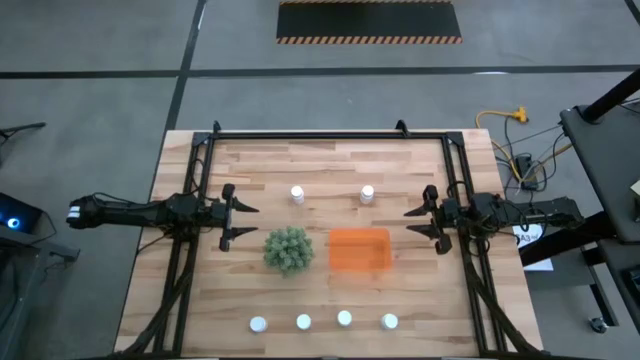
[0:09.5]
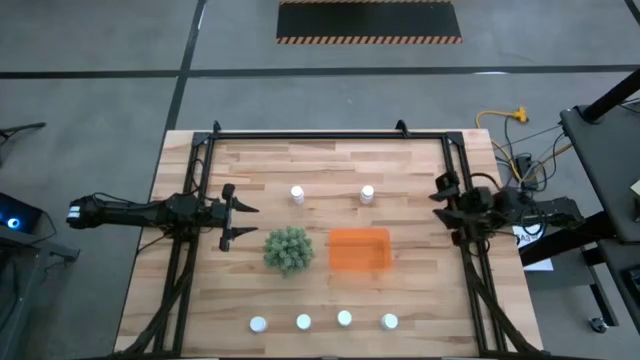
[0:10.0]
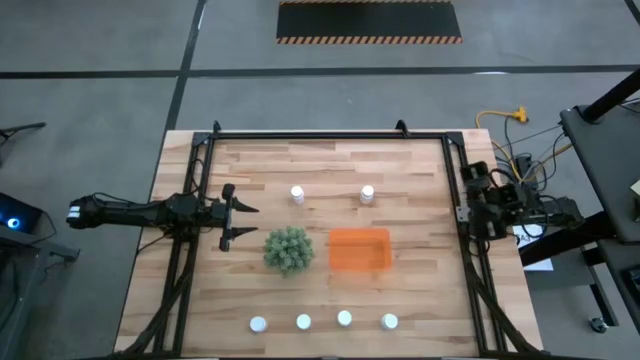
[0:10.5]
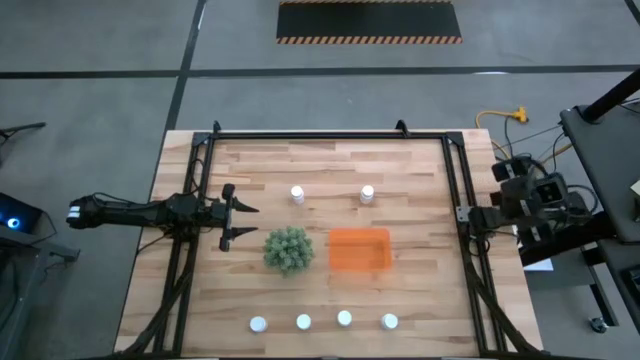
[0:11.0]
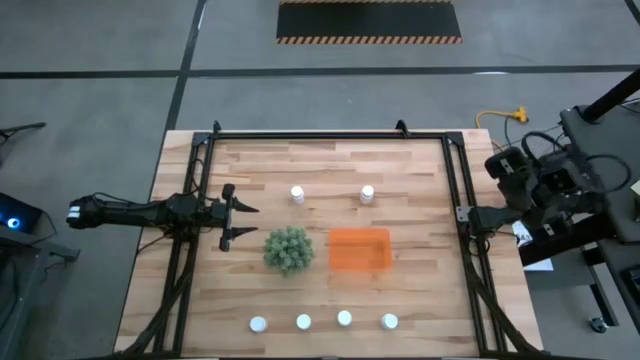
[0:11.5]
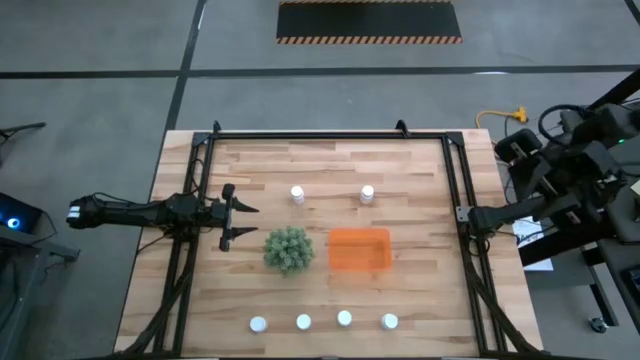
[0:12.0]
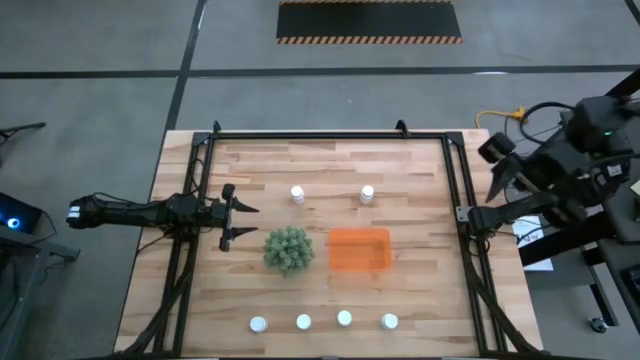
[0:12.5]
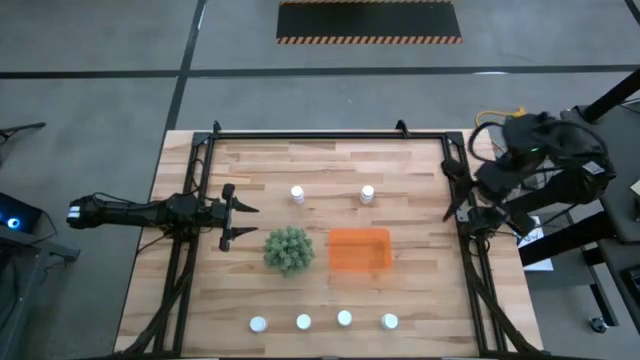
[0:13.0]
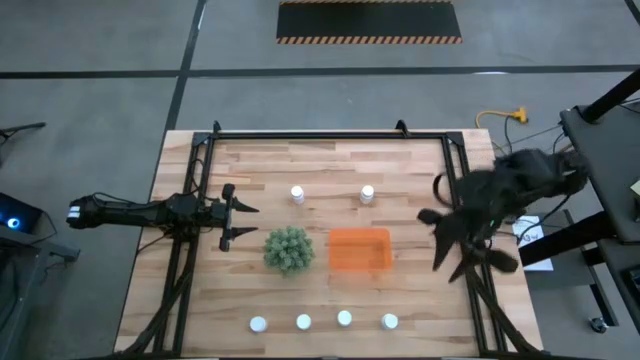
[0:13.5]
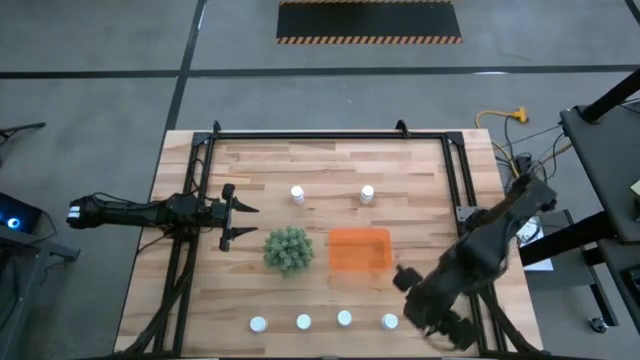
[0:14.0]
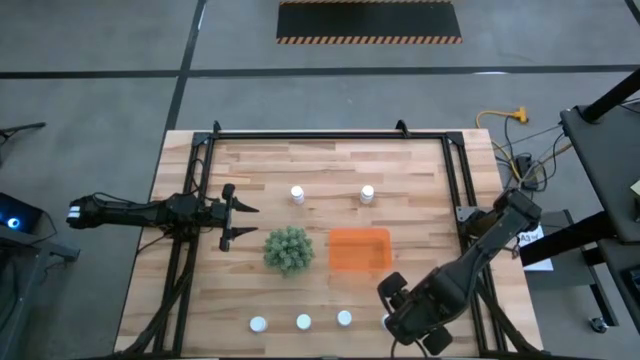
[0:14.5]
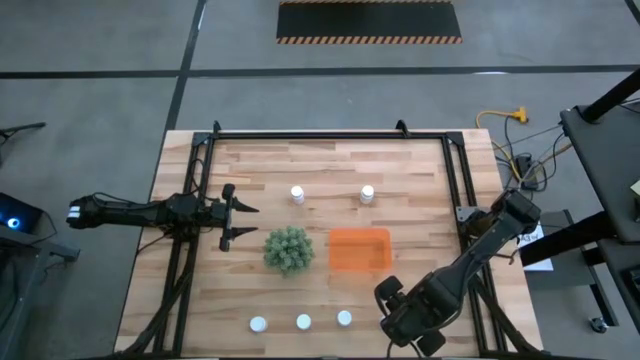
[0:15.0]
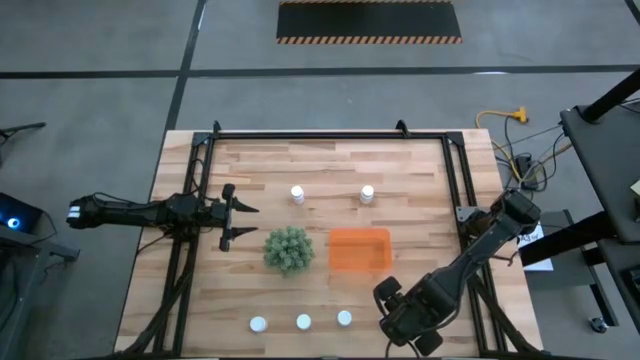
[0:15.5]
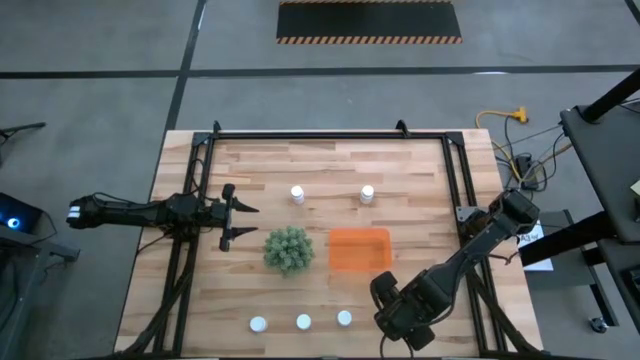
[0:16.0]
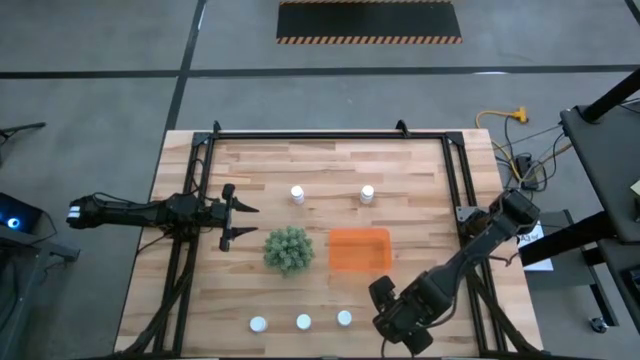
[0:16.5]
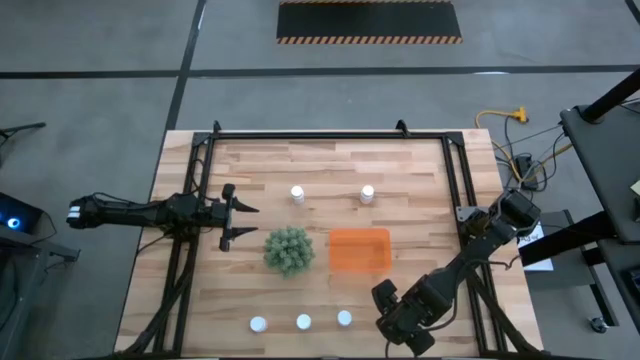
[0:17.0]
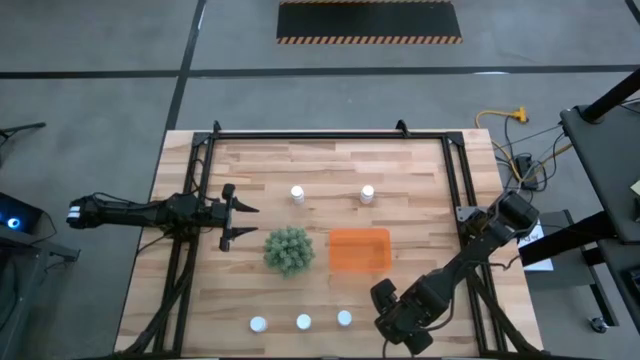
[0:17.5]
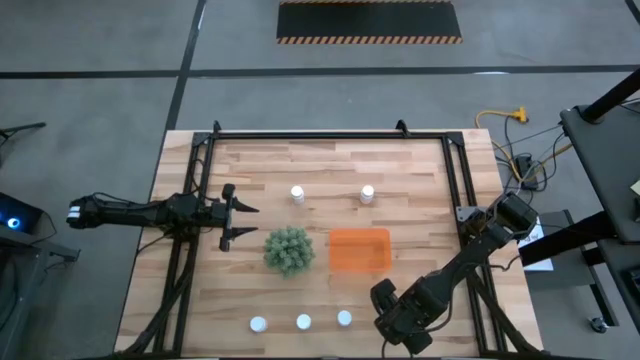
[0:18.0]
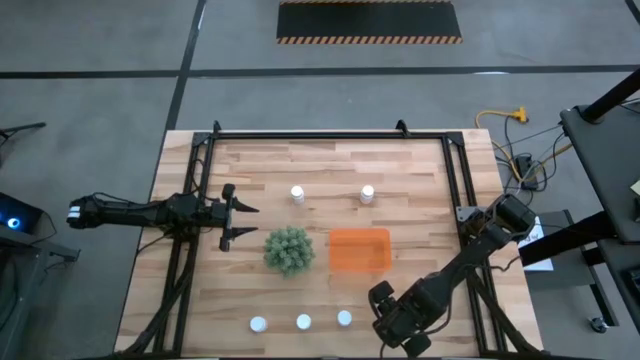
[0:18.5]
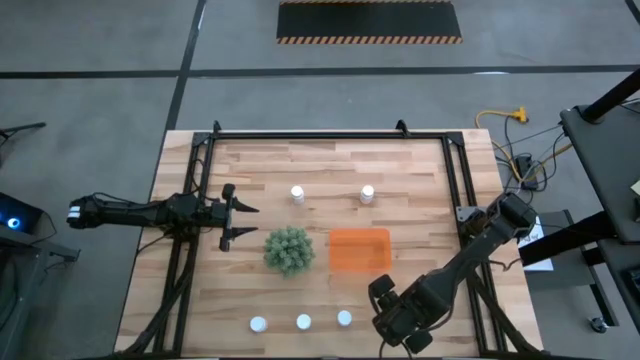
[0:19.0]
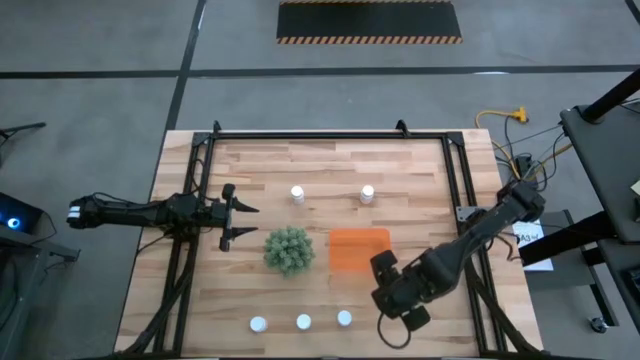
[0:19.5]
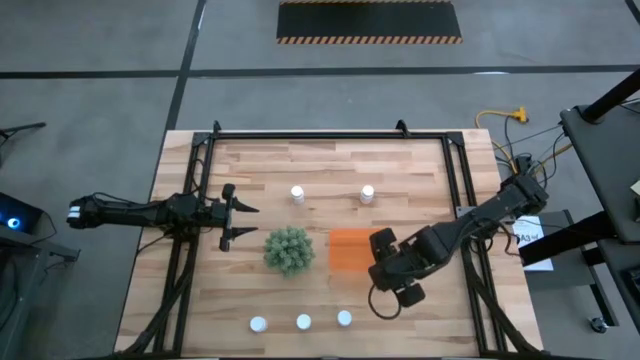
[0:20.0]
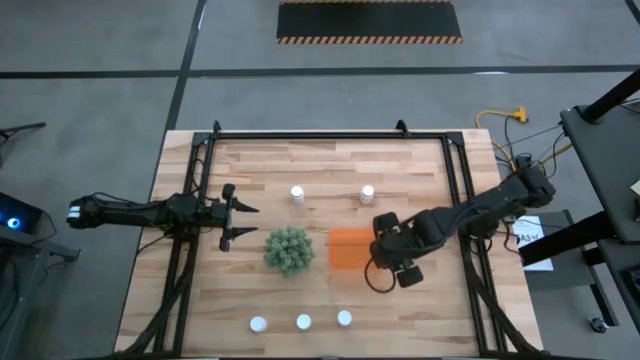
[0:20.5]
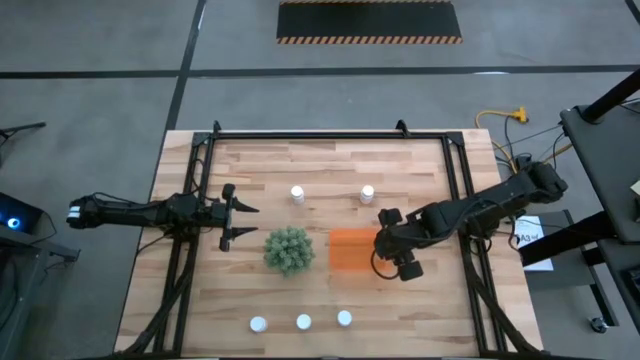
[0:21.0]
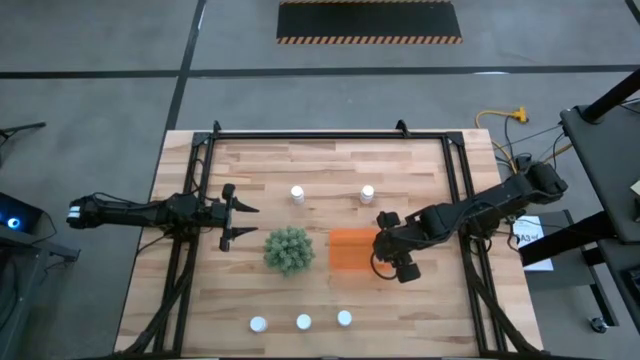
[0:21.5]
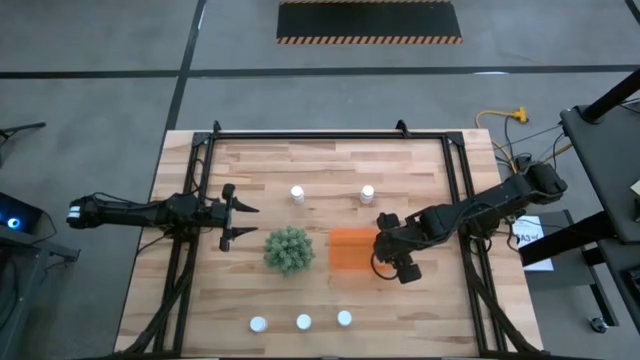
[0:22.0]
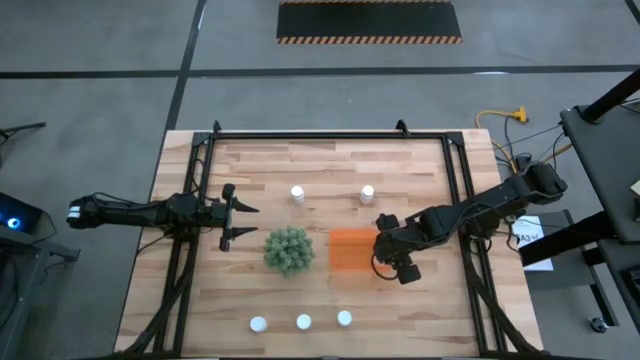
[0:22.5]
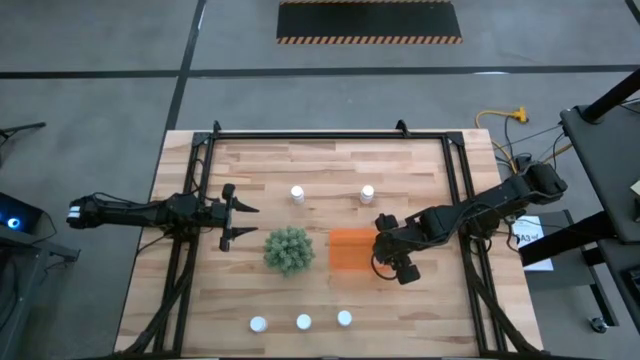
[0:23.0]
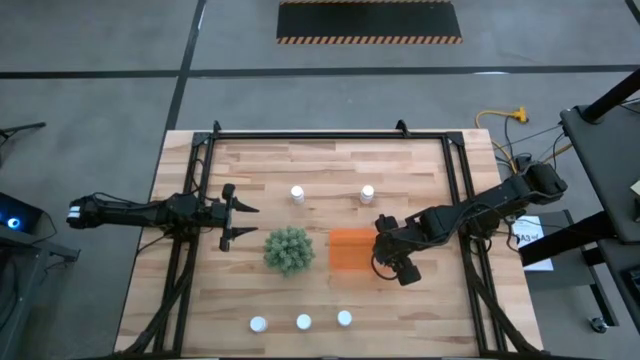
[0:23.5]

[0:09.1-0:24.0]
Task: Pick and place pill bottles into a basket
Put the white pill bottle into the orange bin

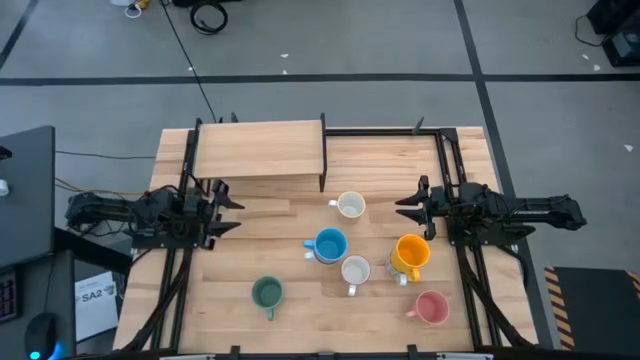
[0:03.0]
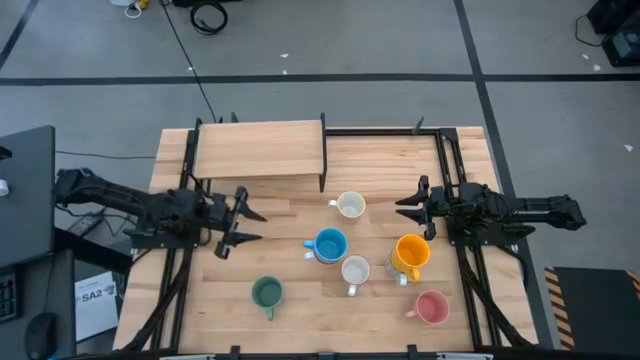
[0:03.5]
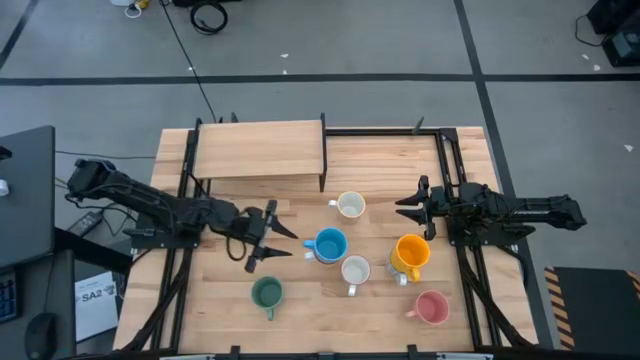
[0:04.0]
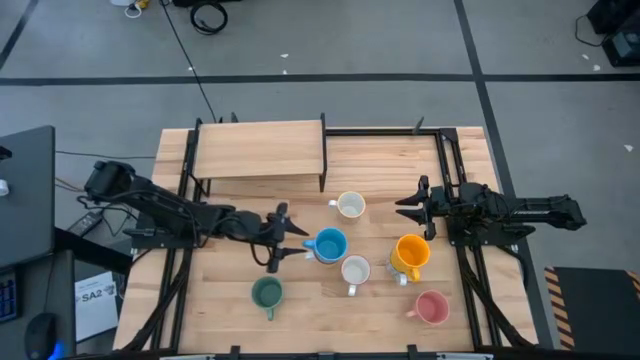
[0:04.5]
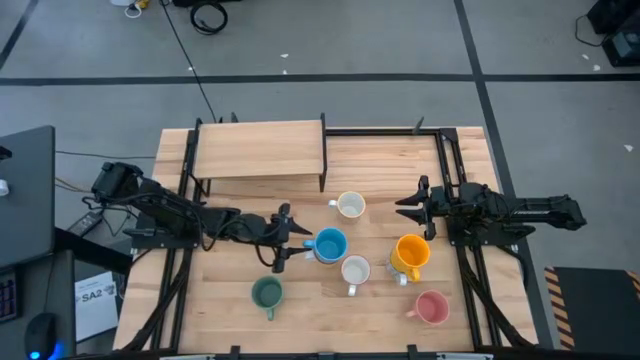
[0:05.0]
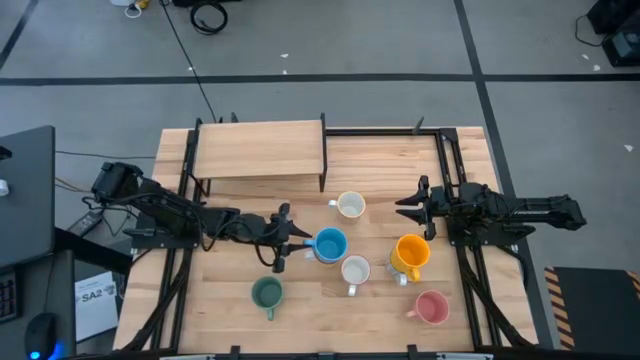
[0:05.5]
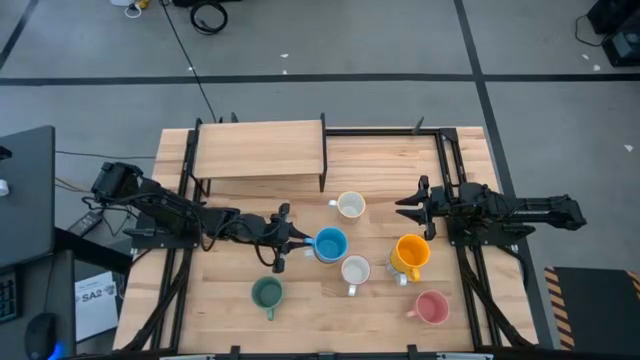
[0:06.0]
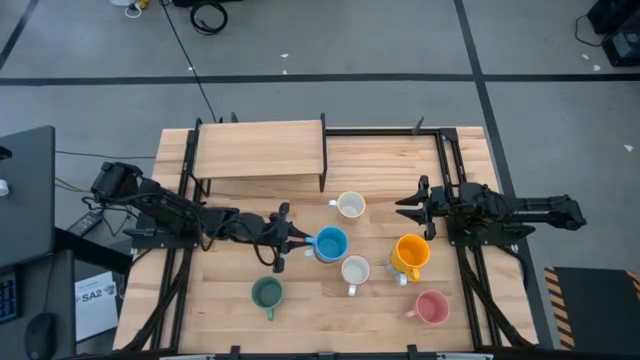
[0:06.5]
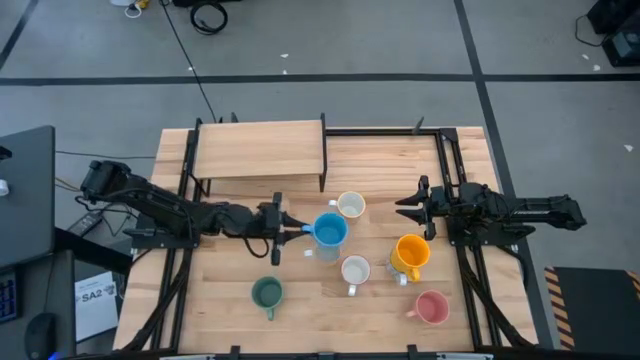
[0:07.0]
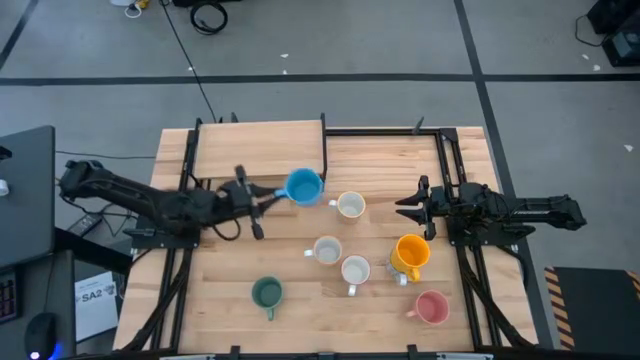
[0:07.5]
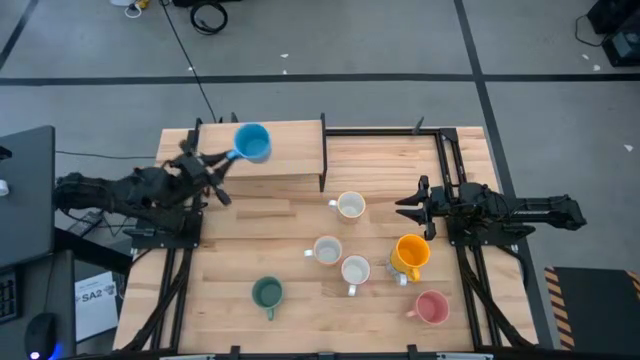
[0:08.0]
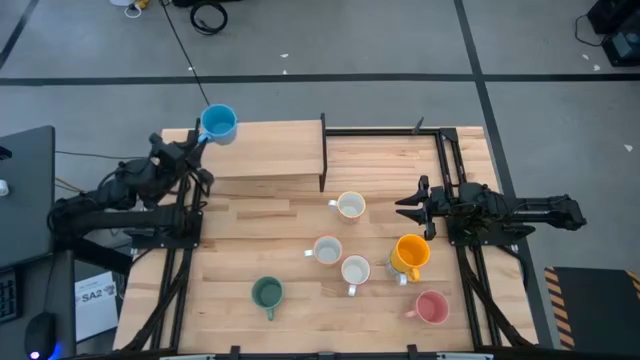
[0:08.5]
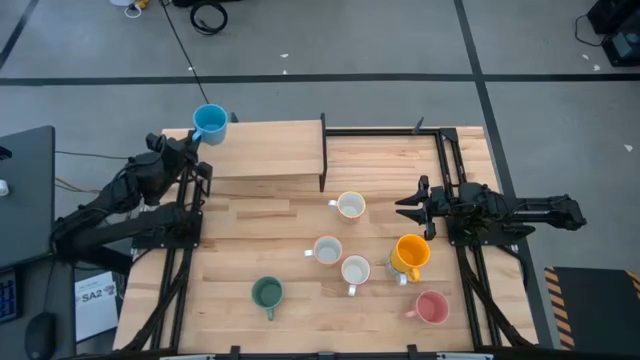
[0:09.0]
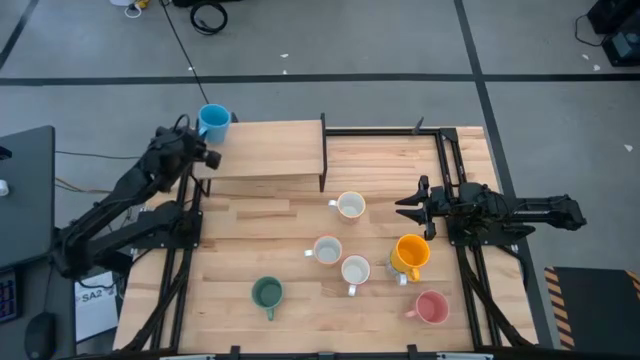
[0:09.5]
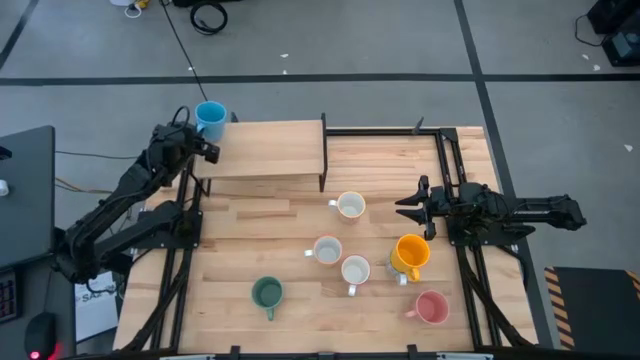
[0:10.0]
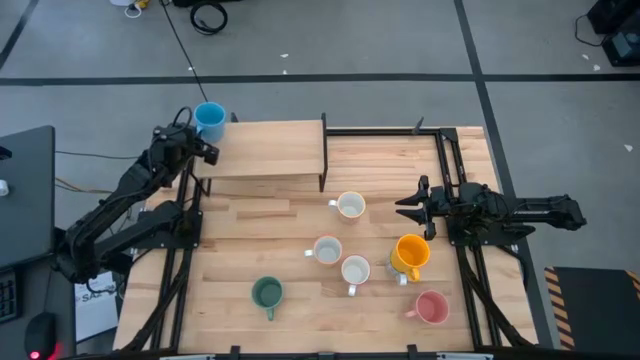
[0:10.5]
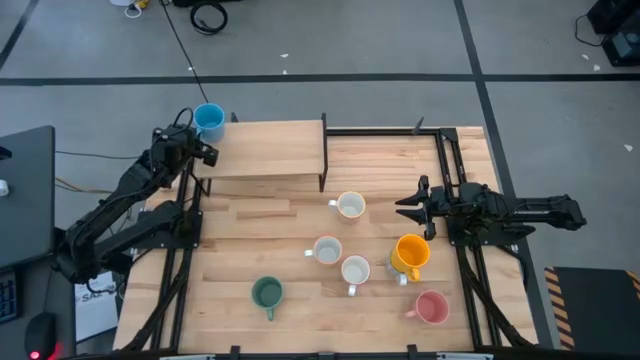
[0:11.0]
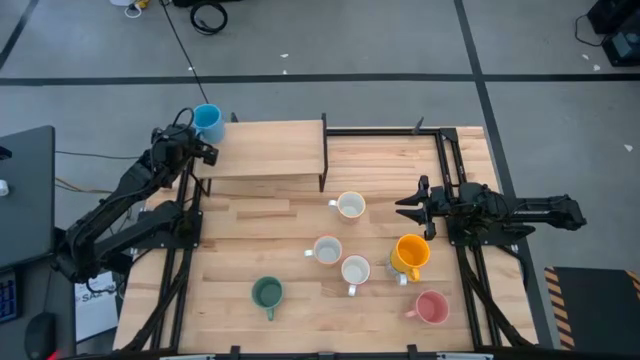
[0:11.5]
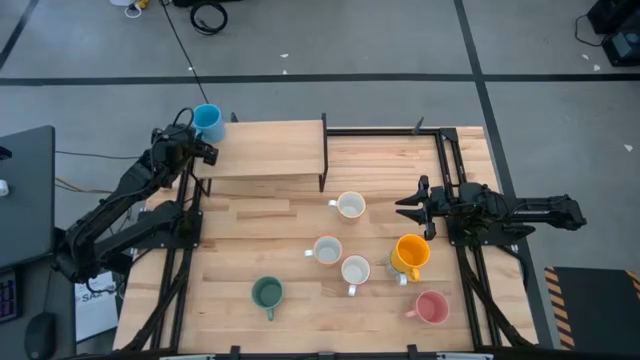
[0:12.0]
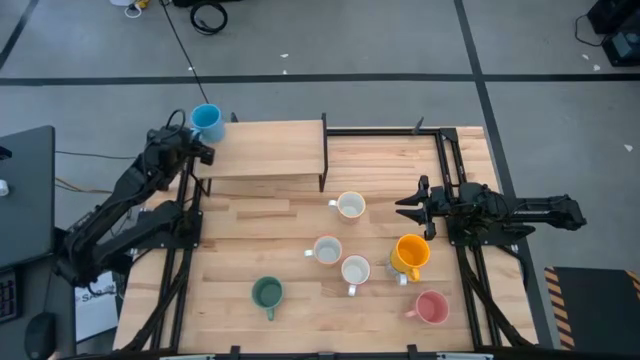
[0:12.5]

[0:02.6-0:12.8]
Task: Place coffee mugs
Put the blue mug on the shelf
